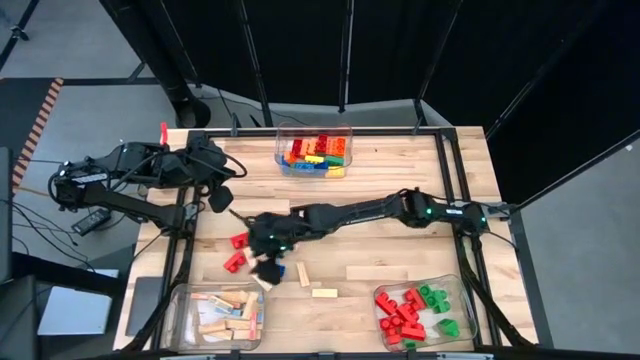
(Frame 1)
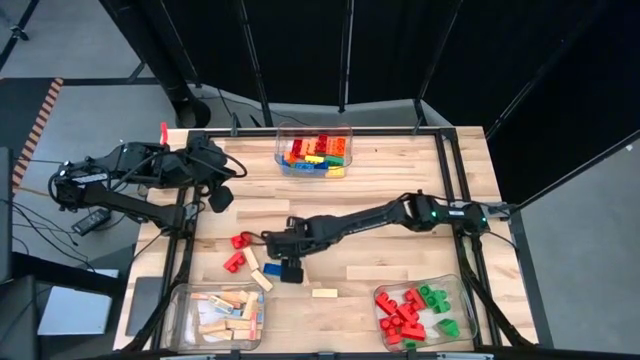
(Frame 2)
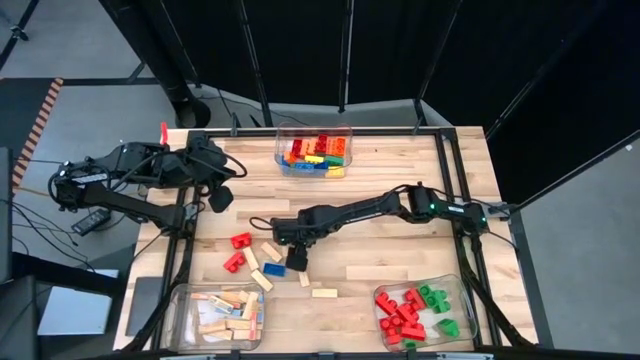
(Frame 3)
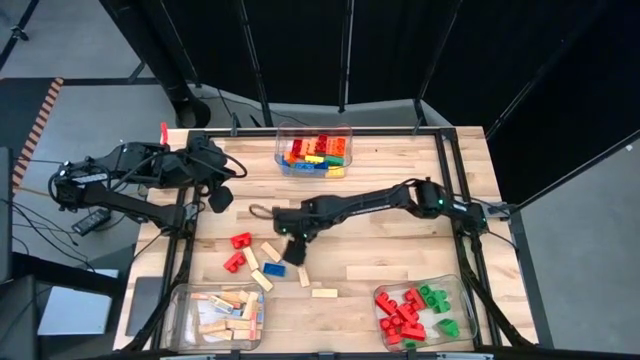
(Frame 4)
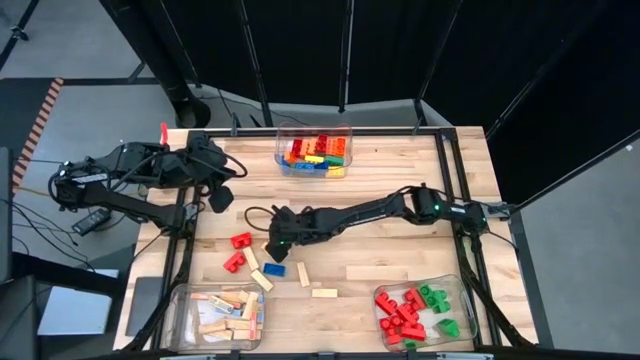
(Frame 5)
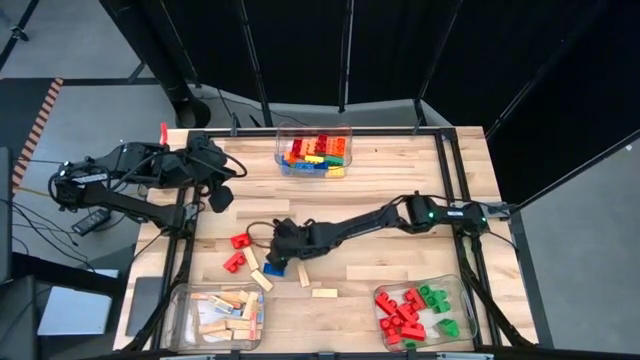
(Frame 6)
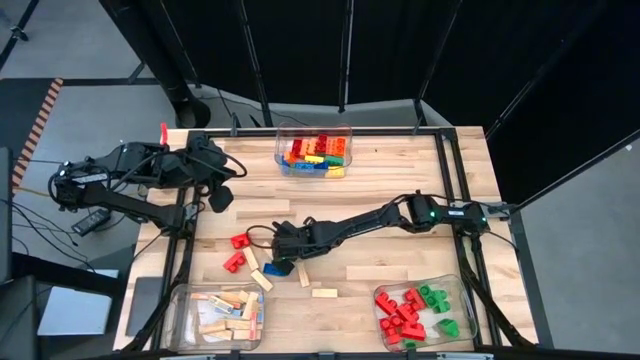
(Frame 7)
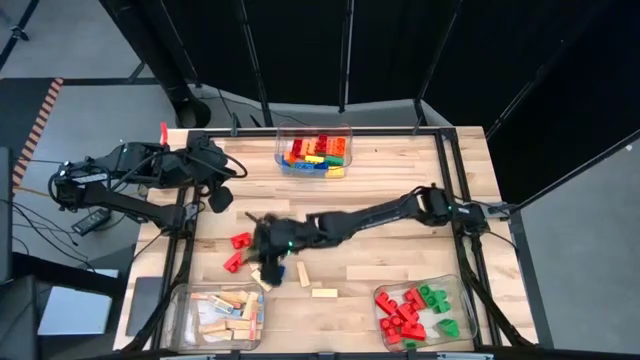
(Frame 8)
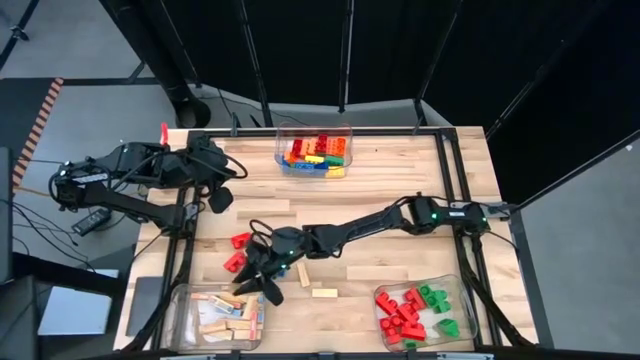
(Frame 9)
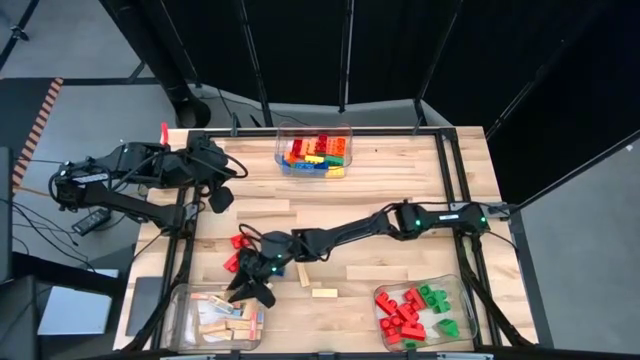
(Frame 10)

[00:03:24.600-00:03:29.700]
Task: Sort blocks by size
Put the white block into the bottom left transparent bin

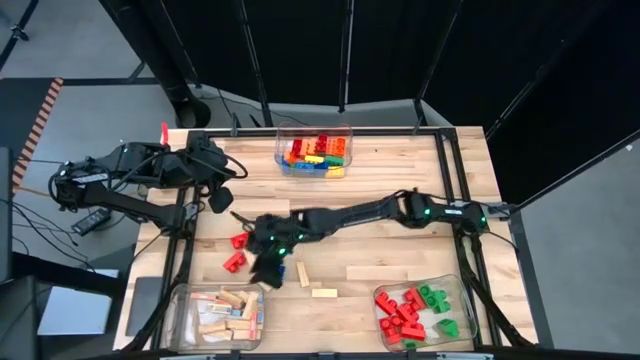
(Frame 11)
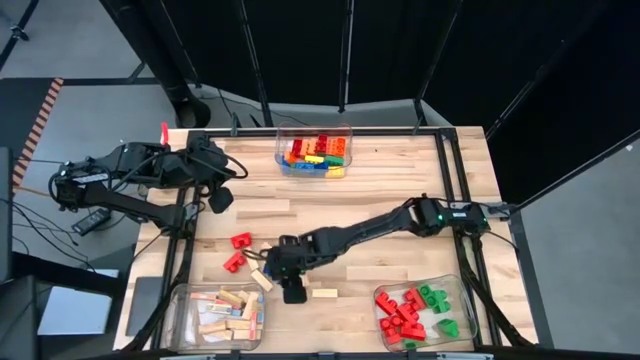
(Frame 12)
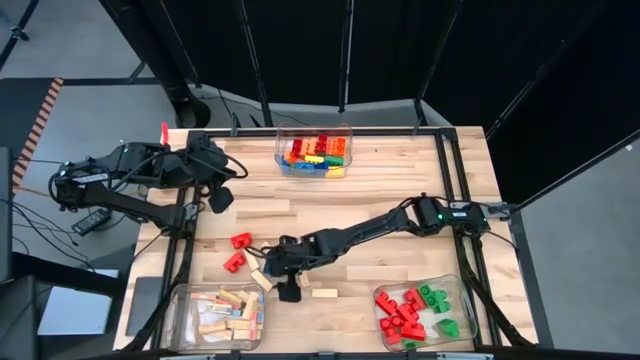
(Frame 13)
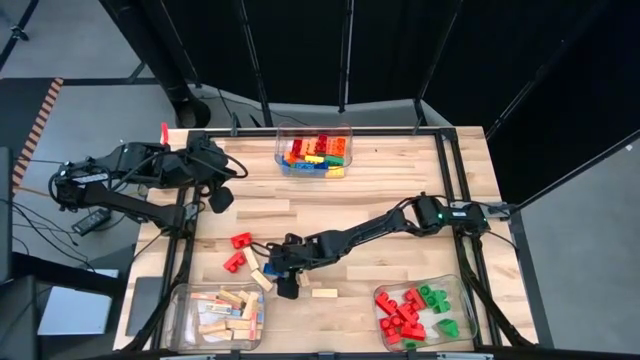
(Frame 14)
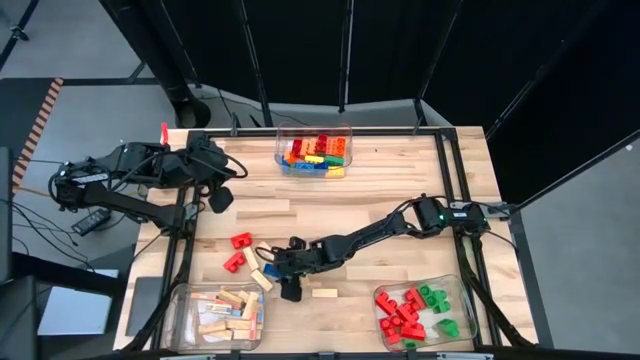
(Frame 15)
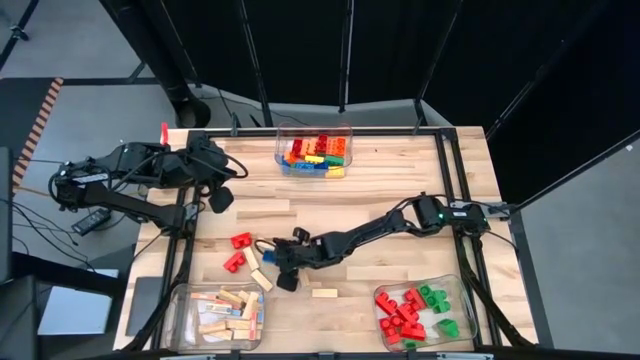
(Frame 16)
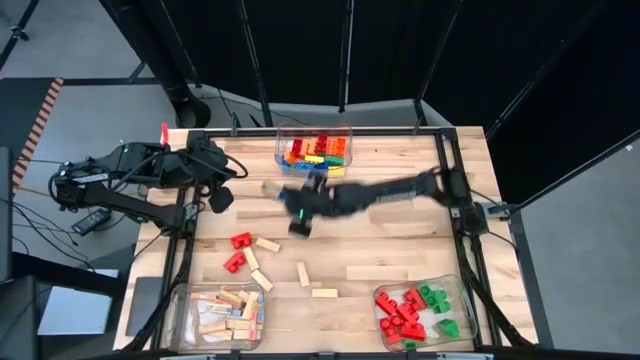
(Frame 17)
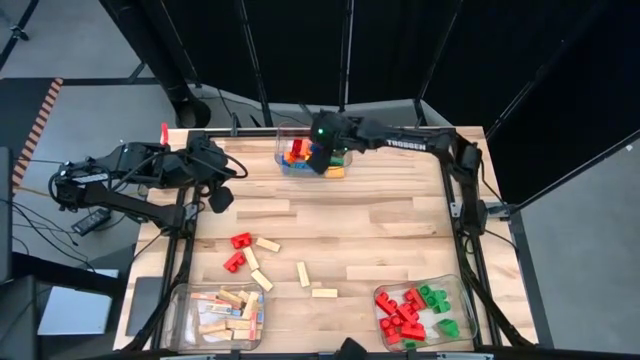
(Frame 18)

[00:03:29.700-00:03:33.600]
Put the 3-stud blue game piece into the top center transparent bin

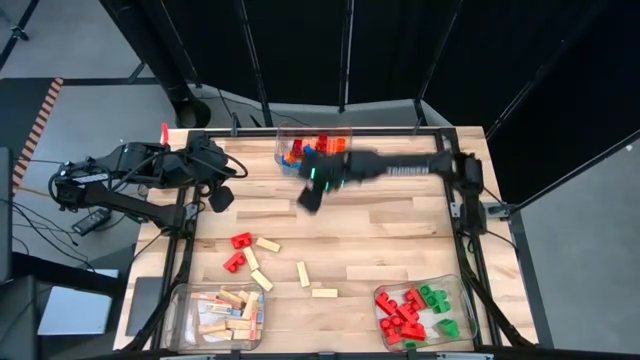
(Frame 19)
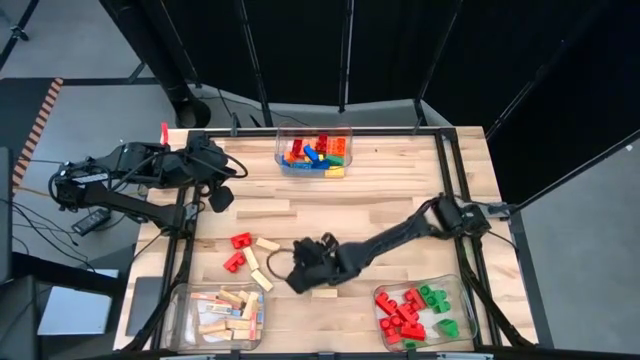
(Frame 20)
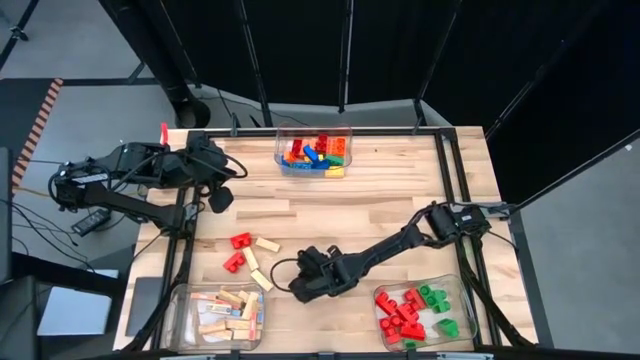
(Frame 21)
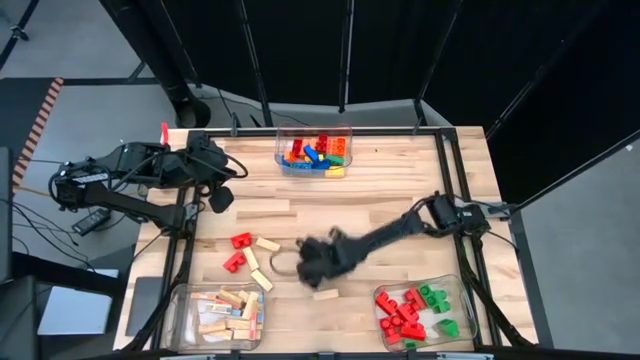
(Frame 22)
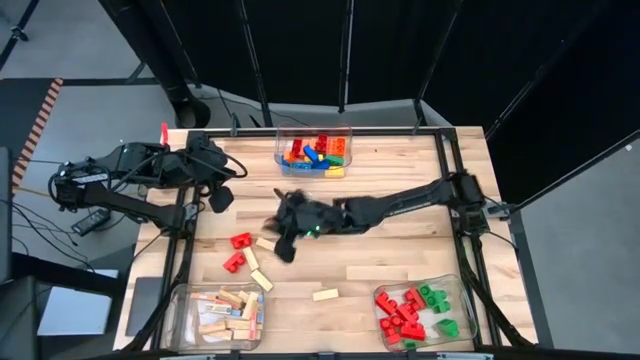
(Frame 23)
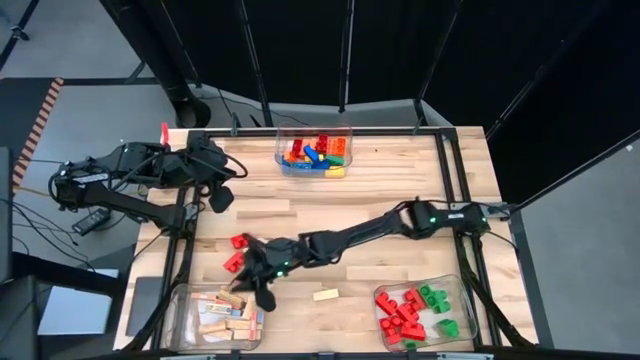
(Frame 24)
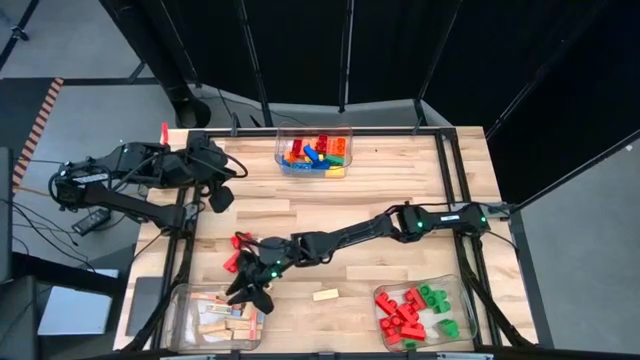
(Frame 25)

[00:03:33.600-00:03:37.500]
Put the white block into the bottom left transparent bin

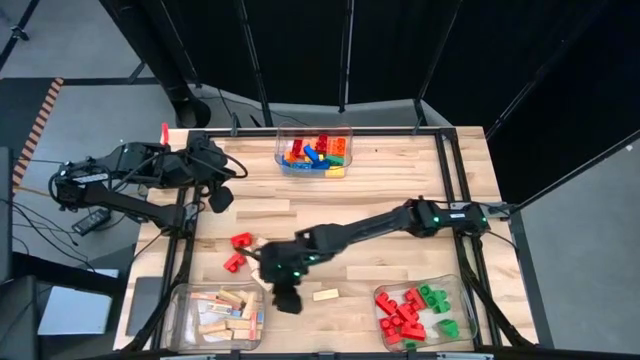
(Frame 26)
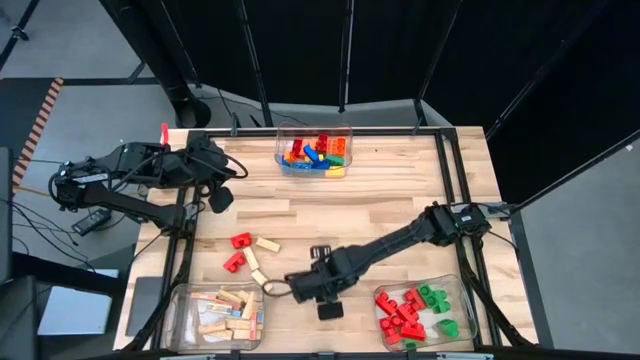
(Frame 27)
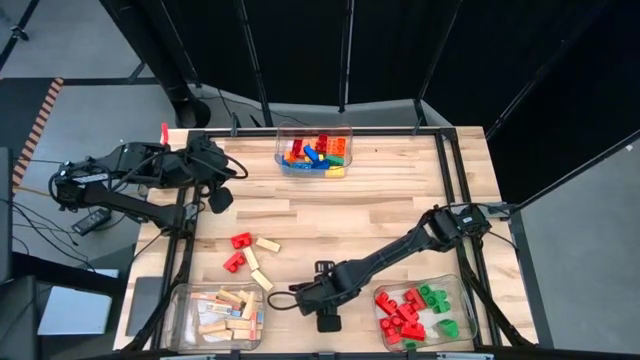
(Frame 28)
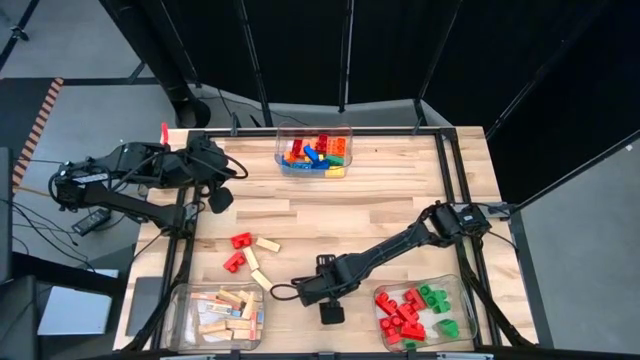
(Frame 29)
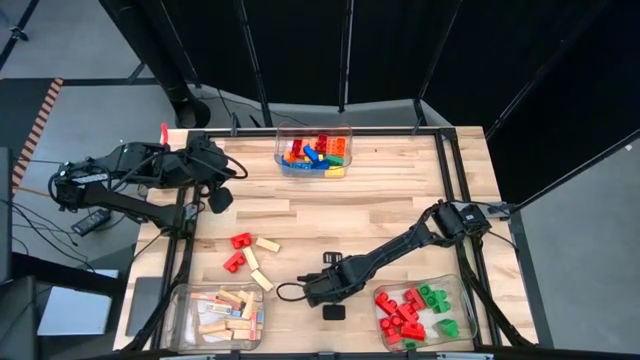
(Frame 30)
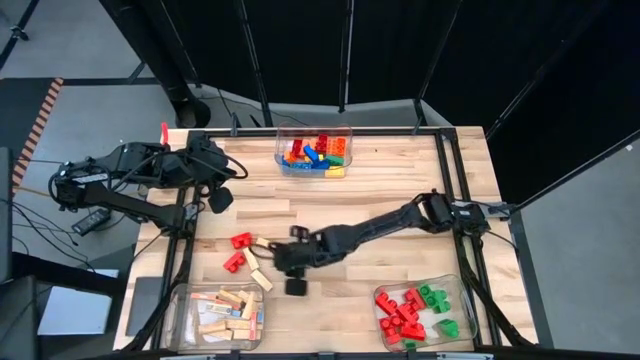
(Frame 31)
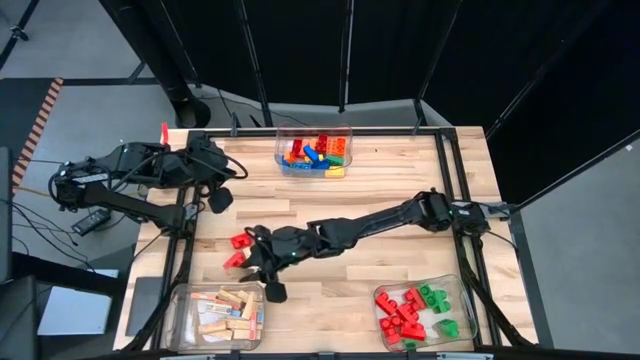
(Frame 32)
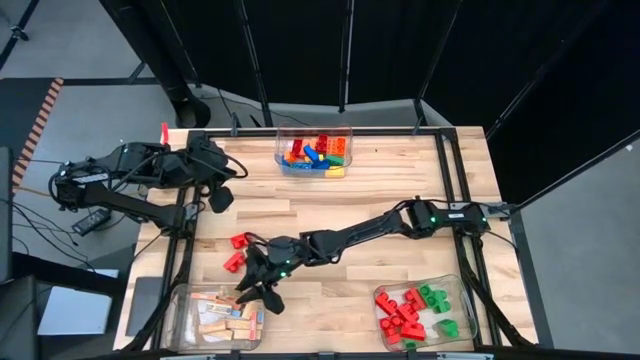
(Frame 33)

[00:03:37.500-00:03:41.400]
Put the white block into the bottom left transparent bin

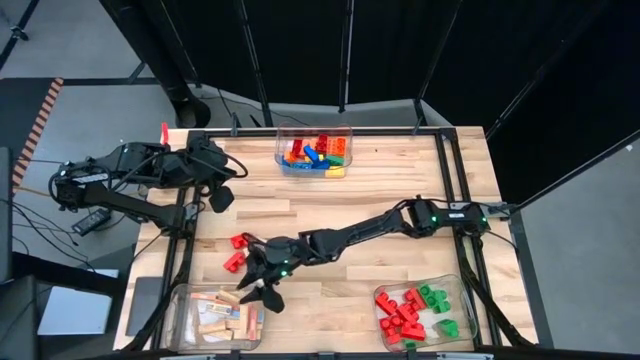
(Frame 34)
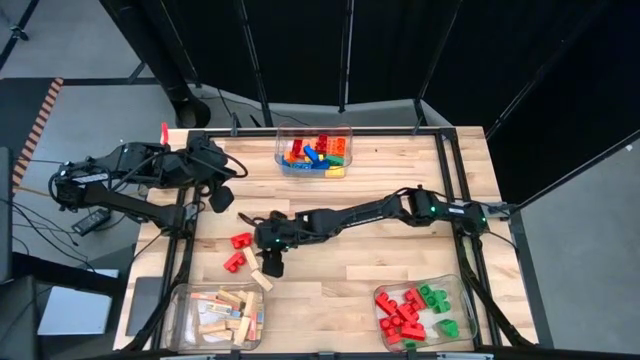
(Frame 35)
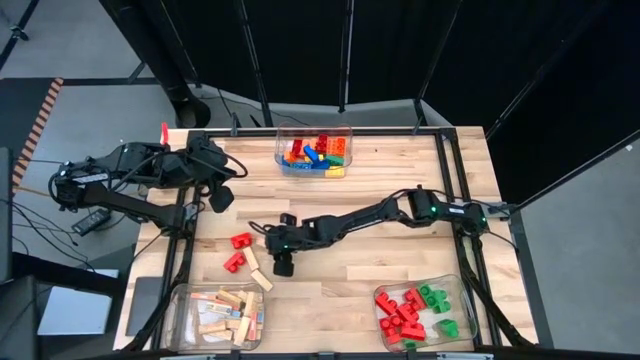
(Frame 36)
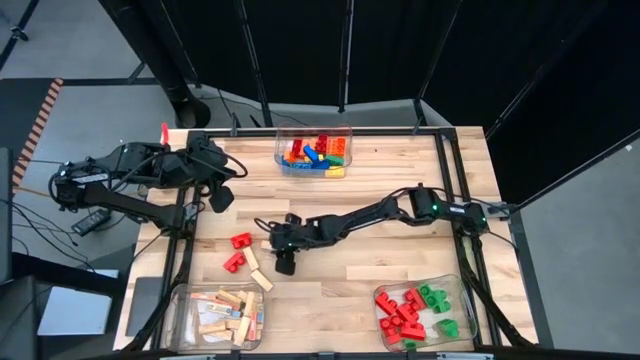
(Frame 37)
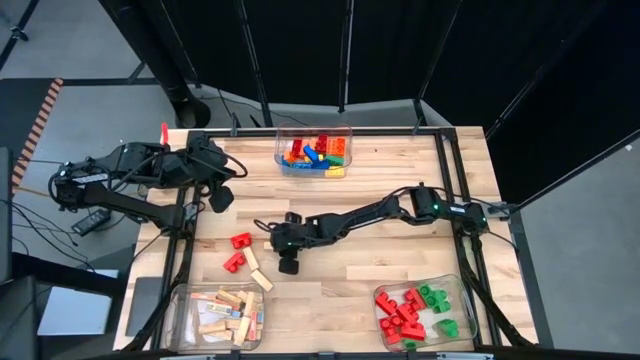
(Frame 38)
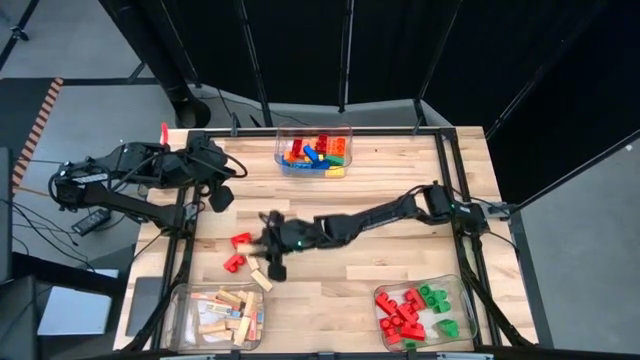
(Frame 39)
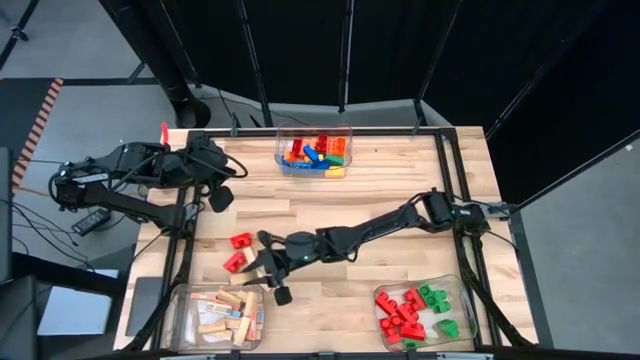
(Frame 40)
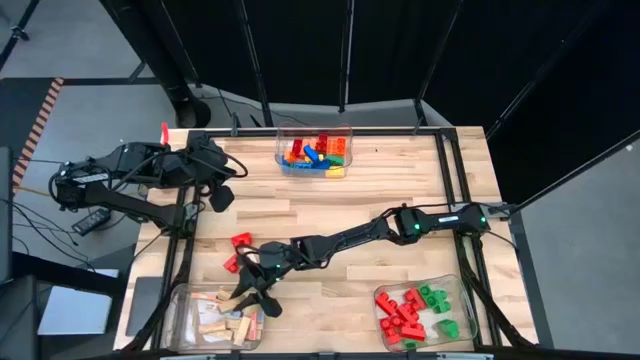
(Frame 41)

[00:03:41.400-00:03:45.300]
Put the white block into the bottom left transparent bin

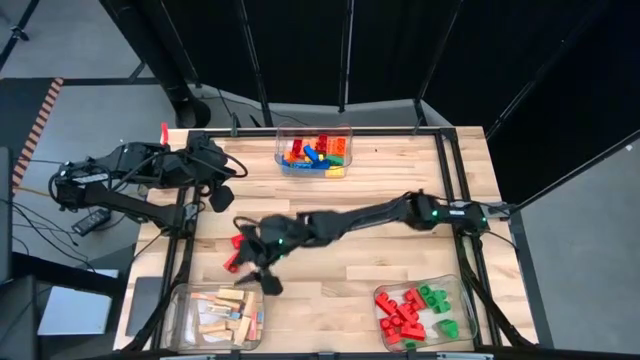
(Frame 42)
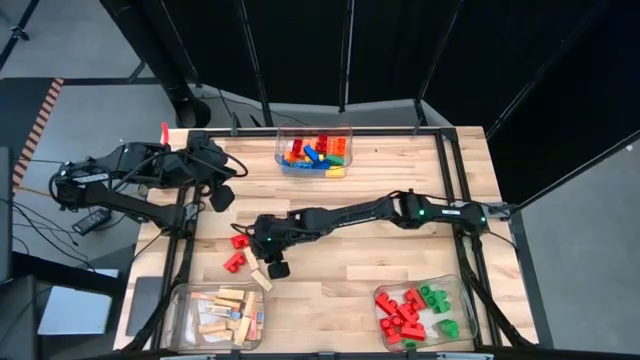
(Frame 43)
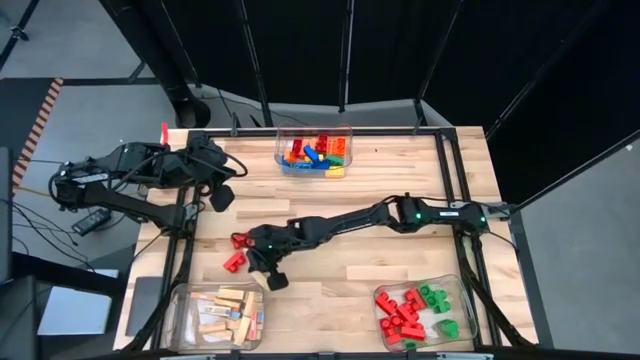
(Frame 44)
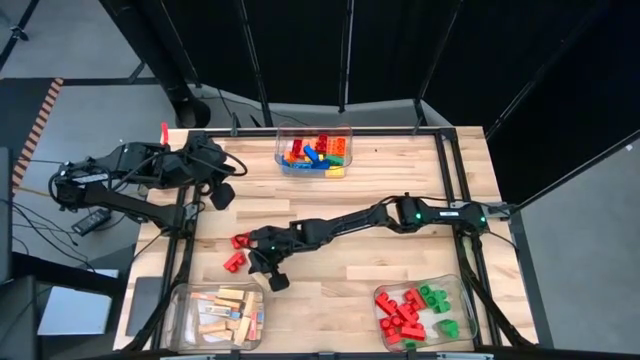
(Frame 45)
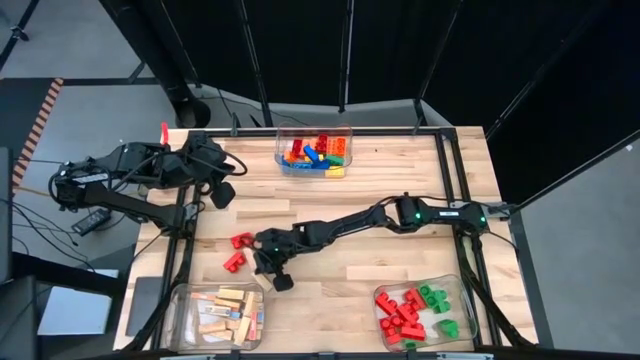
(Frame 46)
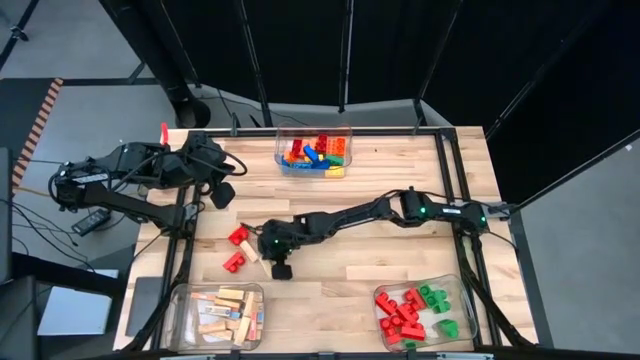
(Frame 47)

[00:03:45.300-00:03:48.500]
Move the white block to the center
